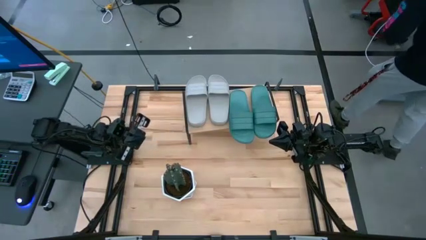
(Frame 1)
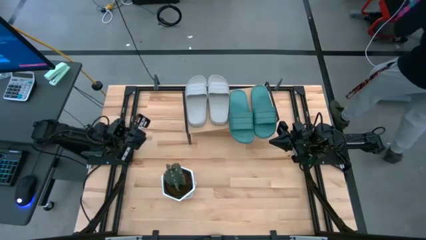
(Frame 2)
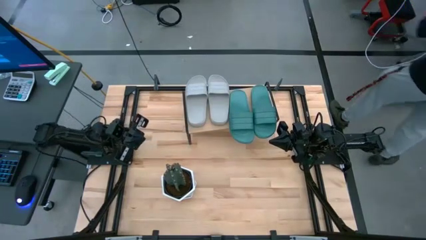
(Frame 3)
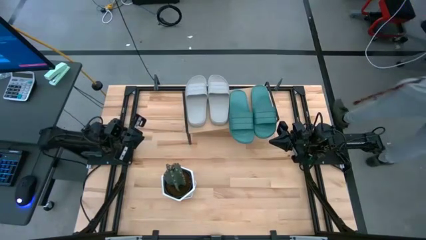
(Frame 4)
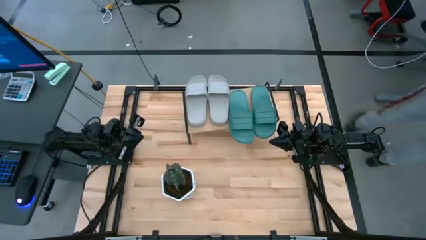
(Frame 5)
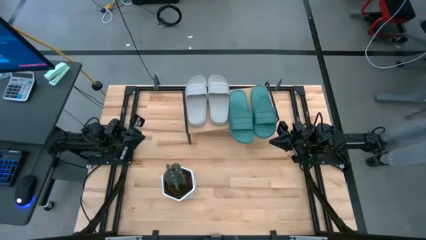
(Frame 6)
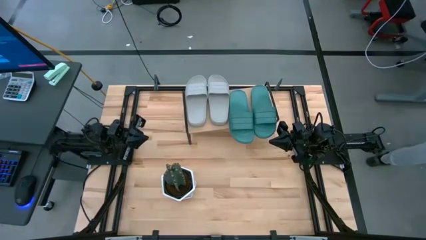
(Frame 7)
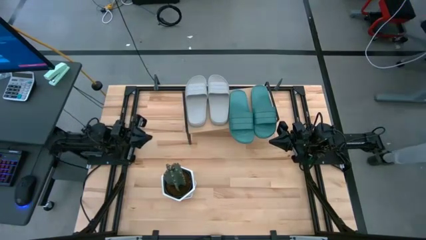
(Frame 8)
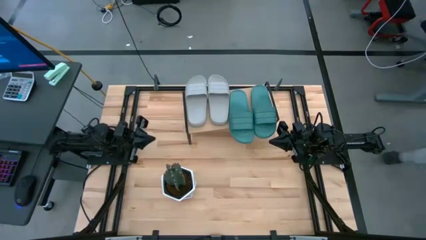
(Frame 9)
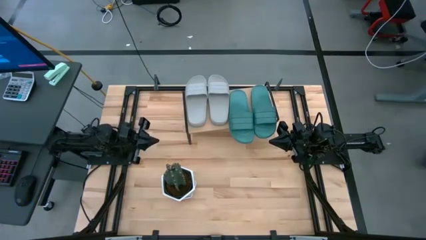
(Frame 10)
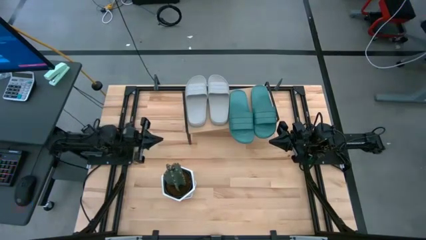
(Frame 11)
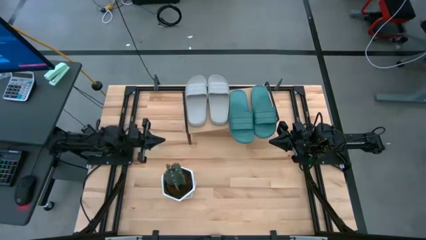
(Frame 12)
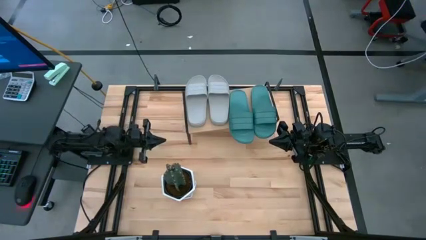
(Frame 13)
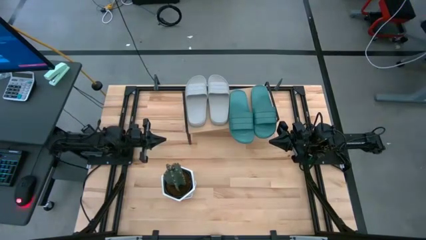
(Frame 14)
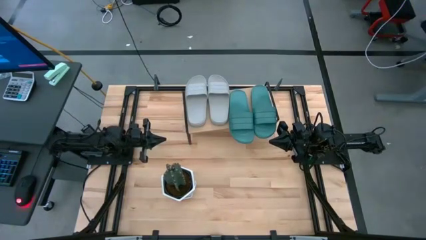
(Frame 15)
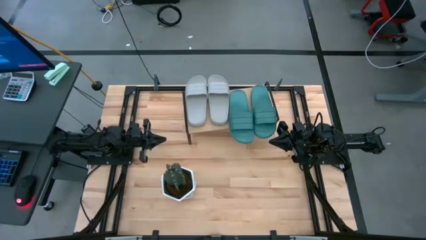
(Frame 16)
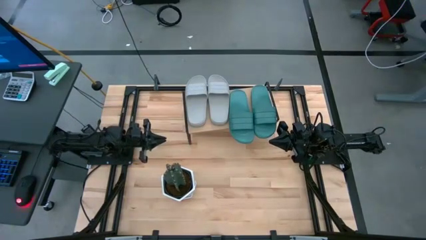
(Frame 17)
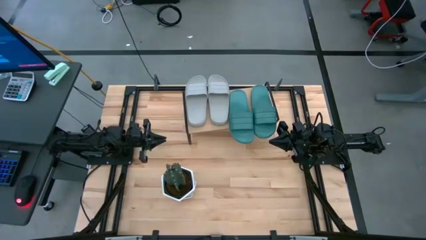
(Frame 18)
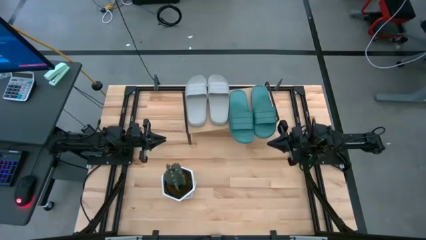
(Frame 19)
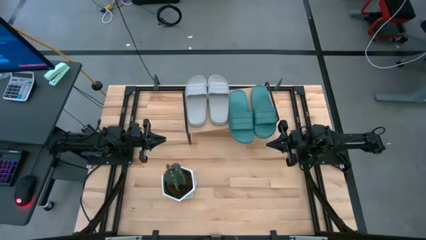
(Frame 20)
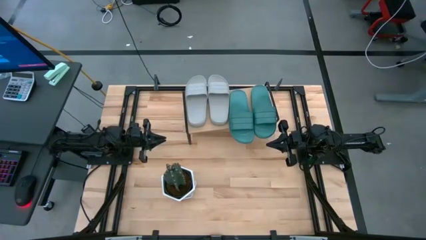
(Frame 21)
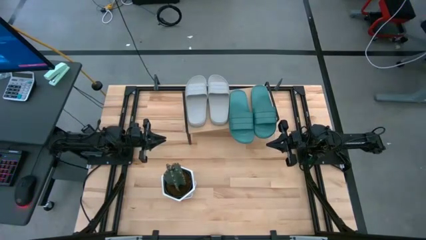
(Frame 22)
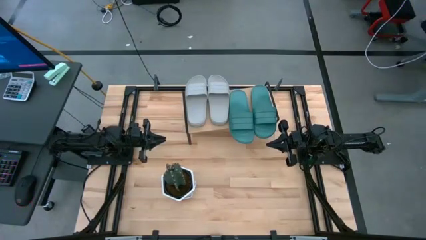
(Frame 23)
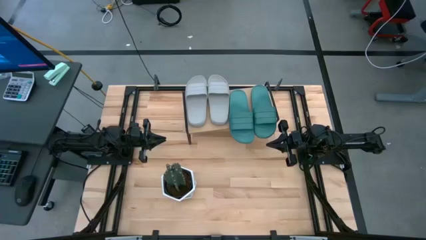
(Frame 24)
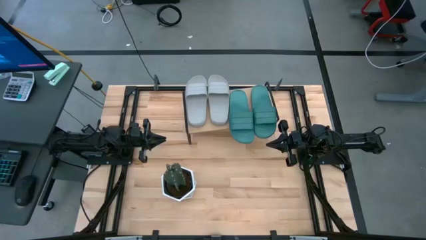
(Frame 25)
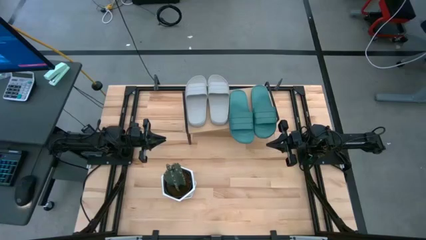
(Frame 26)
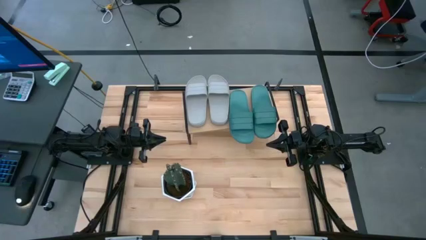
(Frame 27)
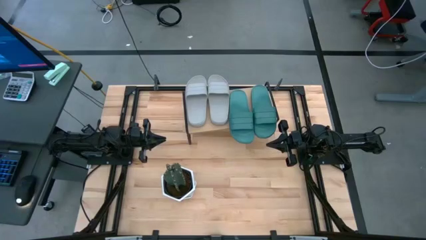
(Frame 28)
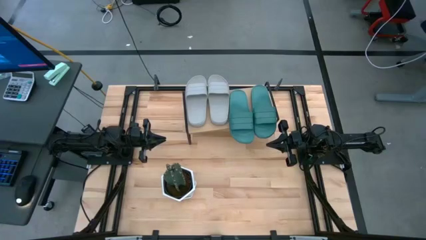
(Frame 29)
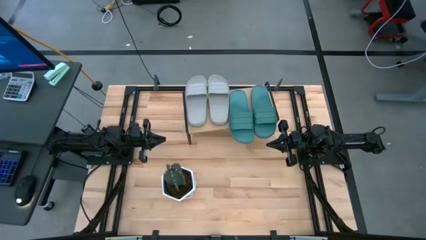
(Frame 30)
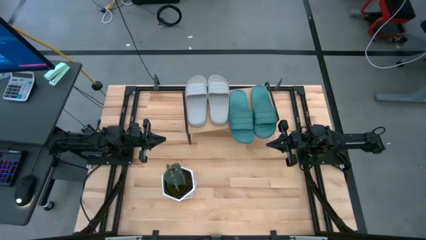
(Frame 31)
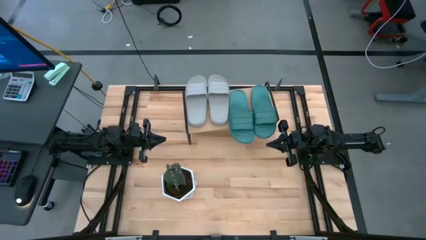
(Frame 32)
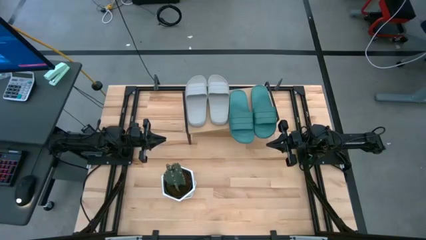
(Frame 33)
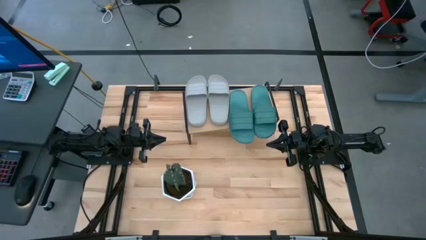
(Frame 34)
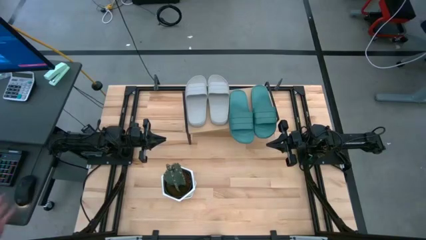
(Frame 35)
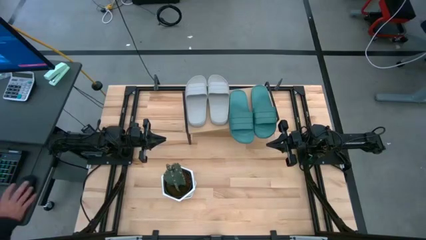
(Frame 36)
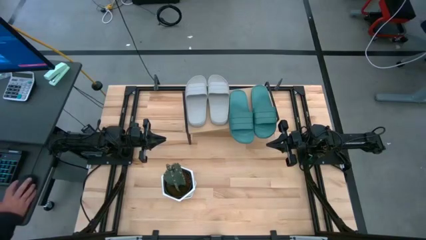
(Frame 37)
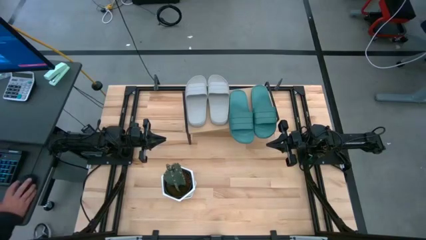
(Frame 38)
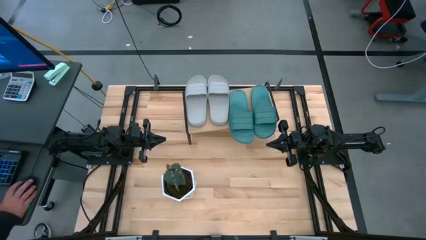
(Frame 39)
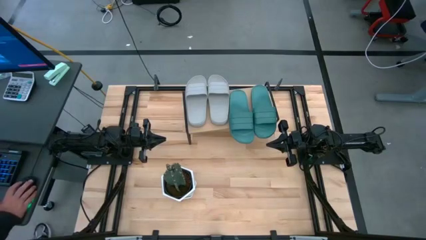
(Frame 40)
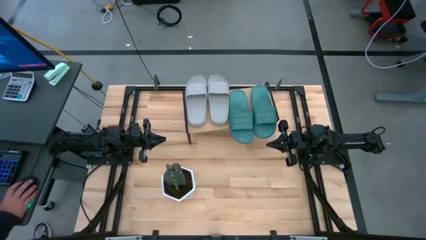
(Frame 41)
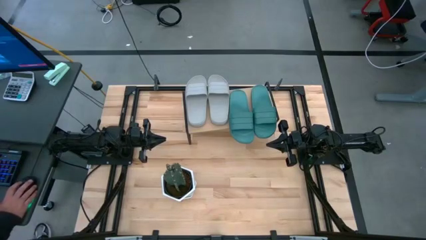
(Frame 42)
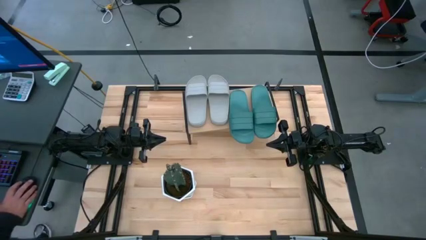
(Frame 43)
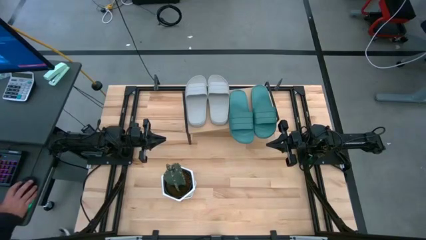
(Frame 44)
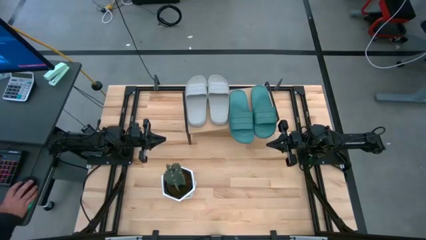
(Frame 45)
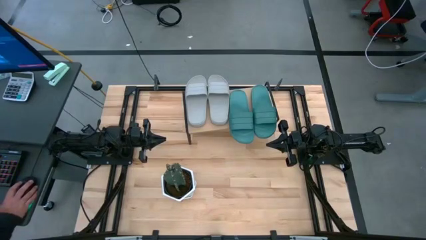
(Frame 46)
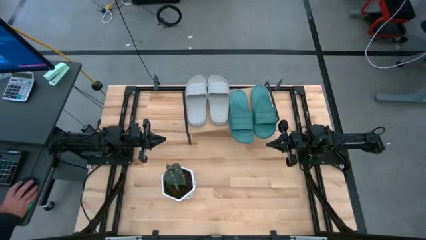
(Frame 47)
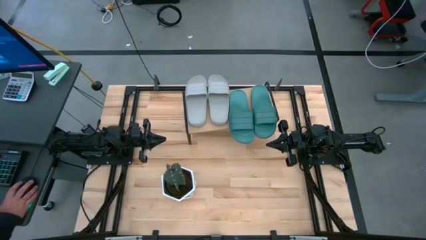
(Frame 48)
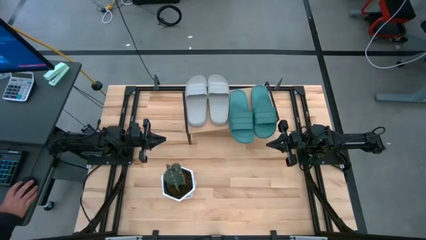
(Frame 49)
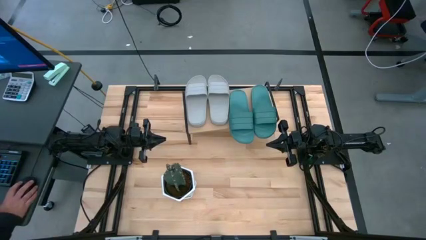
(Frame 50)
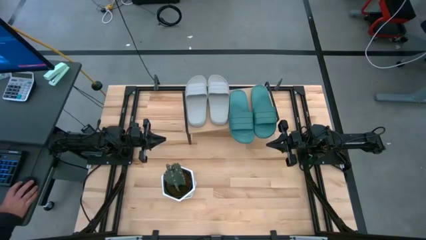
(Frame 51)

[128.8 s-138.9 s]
Task: Pick and place slides into the shelf
Return to Home Position

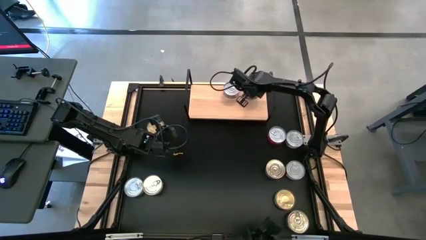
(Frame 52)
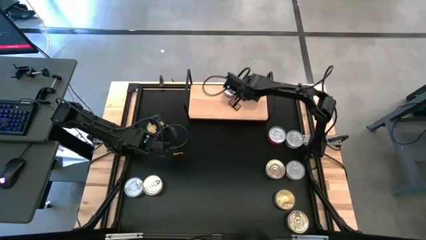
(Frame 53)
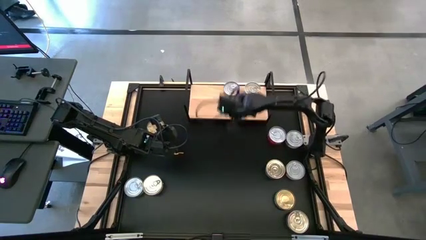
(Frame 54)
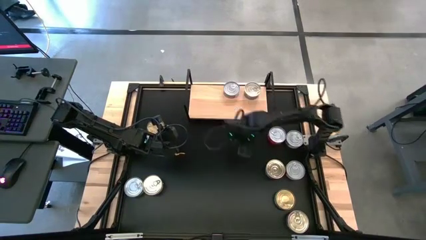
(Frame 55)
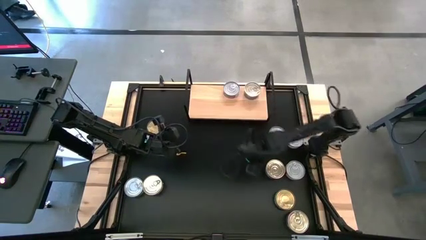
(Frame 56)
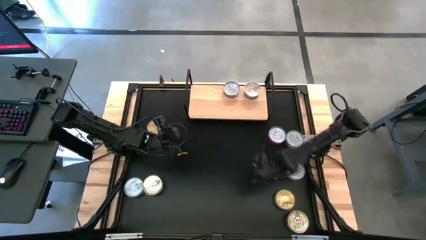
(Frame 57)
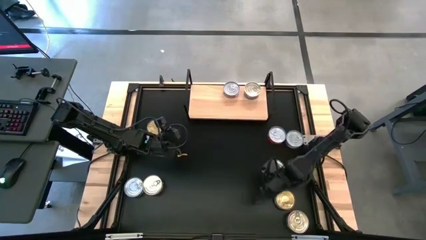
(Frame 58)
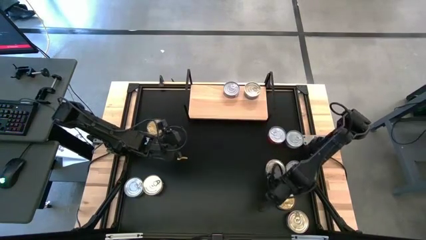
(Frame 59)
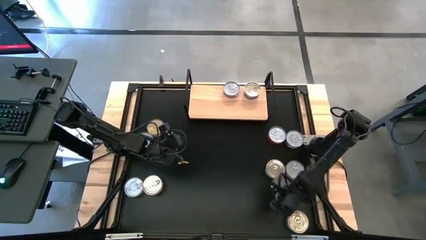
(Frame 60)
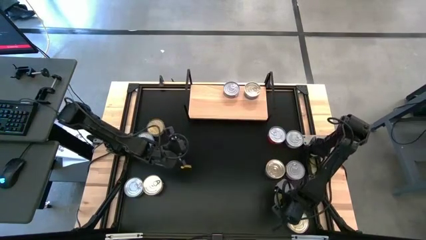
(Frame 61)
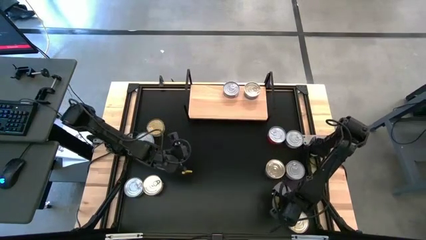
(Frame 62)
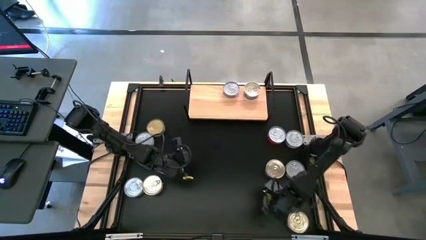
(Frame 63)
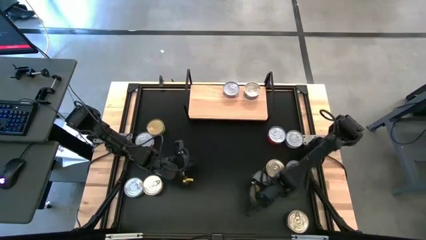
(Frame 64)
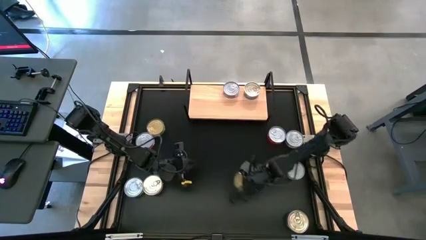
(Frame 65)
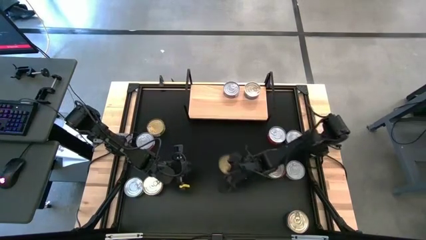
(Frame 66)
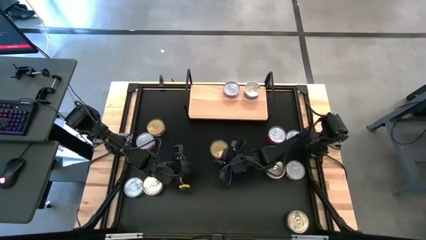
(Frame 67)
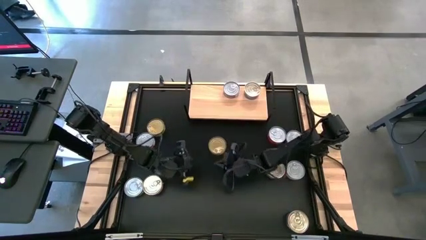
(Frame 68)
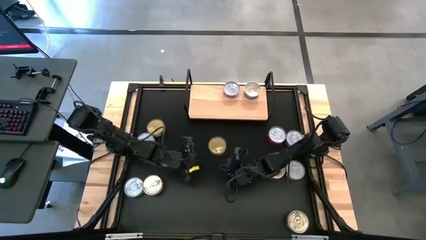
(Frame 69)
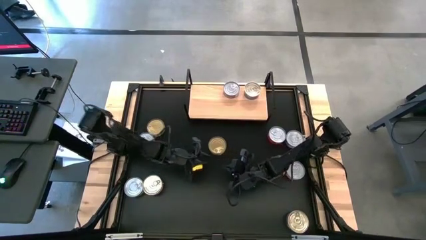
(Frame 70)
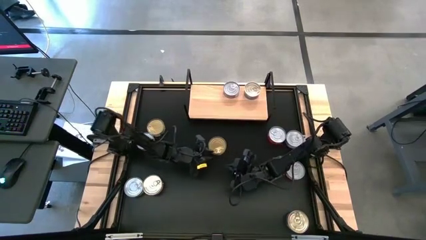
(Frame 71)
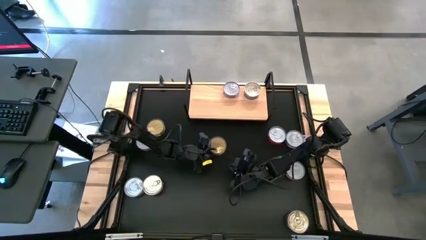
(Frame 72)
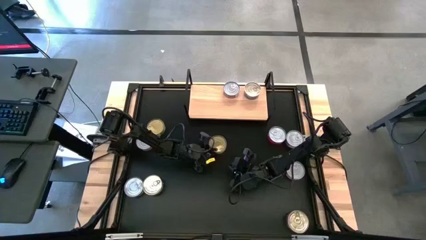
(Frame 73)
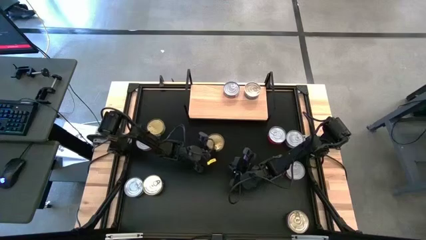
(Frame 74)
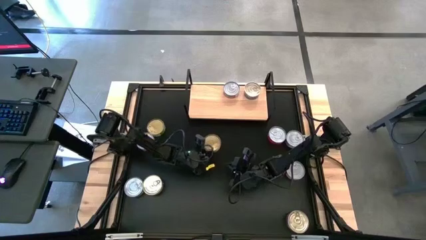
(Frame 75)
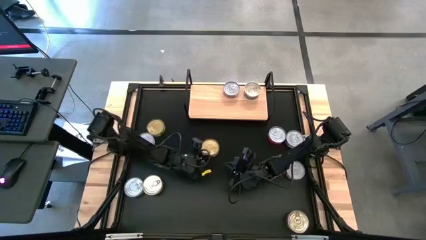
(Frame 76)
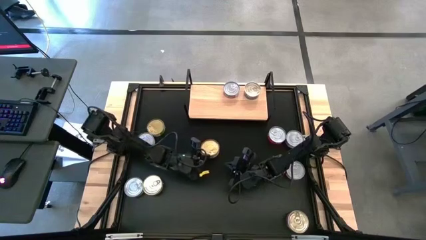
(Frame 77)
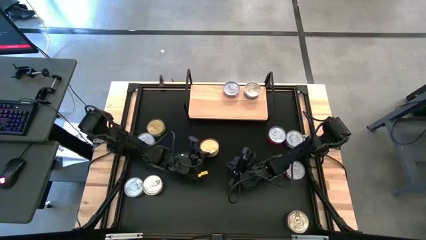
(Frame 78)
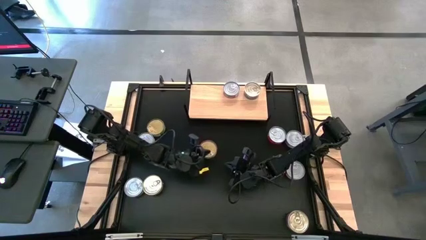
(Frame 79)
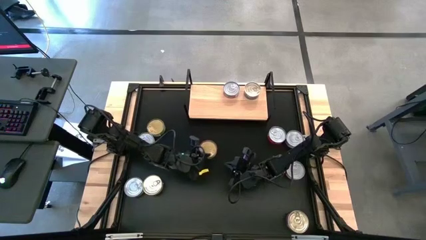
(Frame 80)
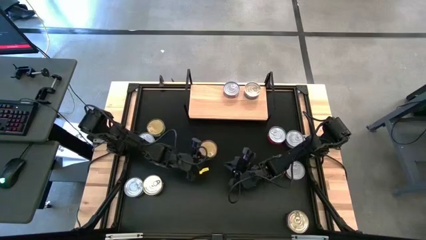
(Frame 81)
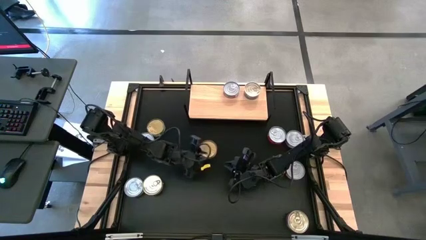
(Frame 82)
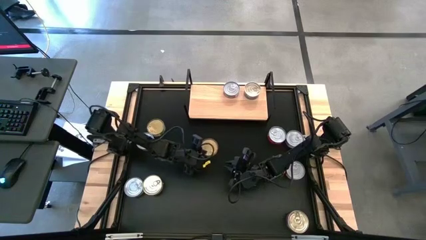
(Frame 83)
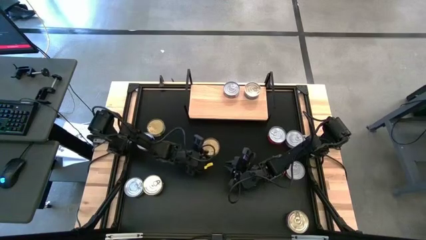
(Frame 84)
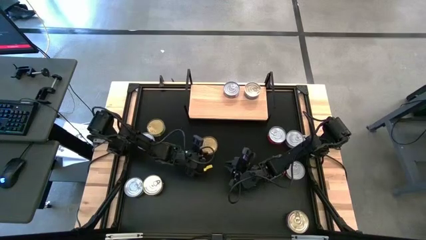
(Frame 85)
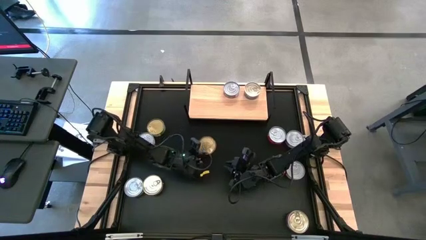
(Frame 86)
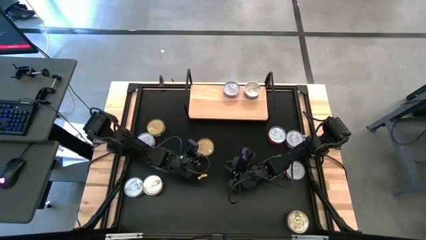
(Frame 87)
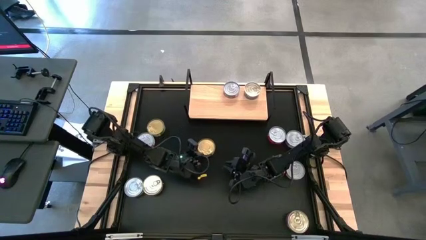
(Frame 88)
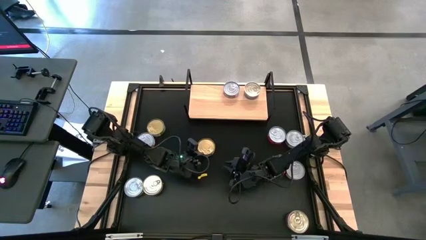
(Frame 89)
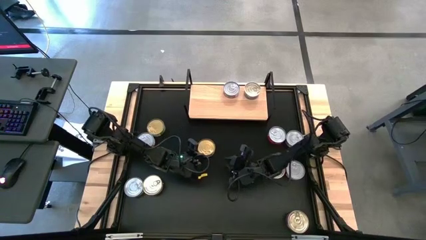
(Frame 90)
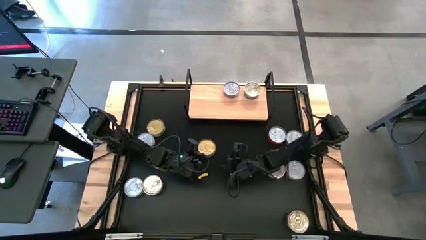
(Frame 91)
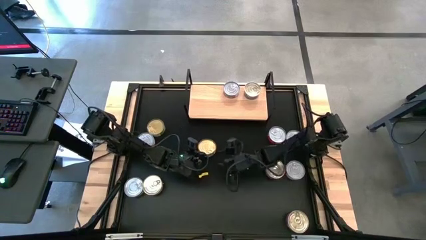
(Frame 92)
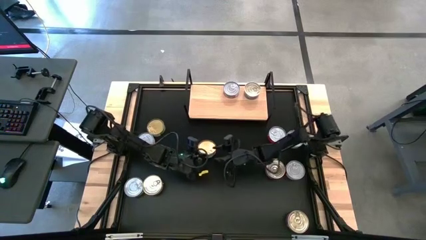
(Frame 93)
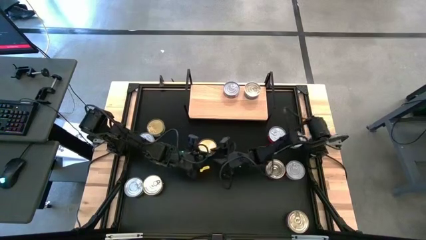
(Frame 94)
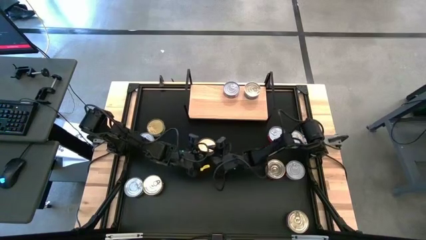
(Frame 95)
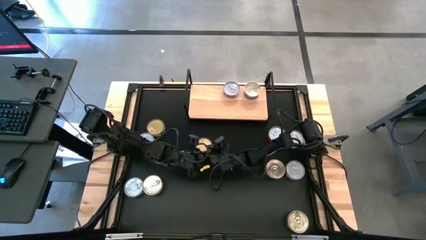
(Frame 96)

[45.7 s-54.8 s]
Task: Stack canned seafood by type on shelf
Put the green tuna can on the shelf
